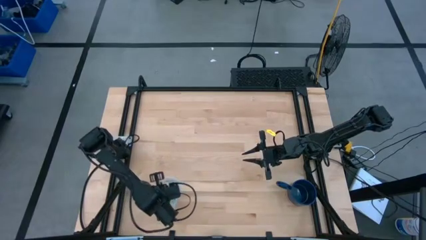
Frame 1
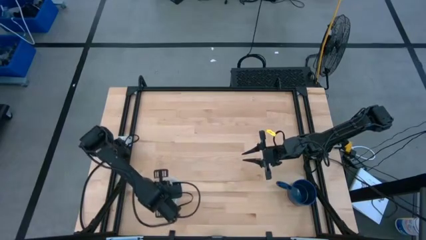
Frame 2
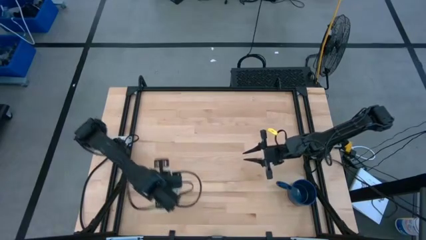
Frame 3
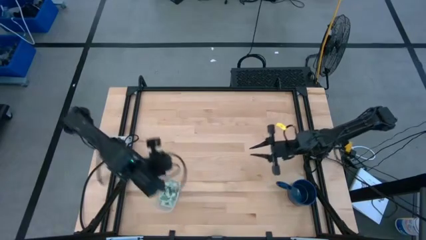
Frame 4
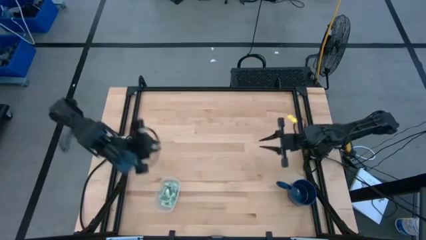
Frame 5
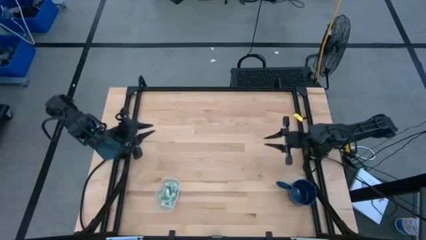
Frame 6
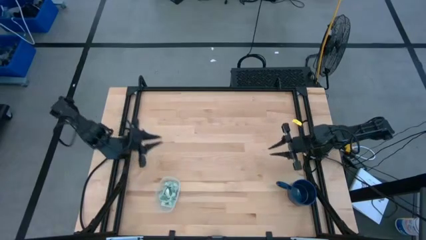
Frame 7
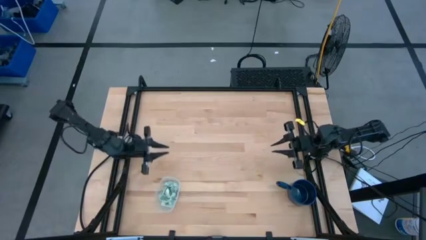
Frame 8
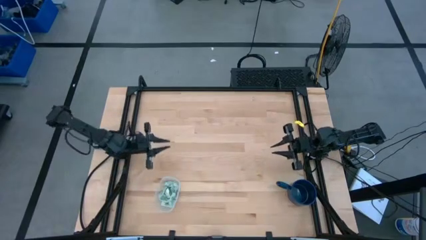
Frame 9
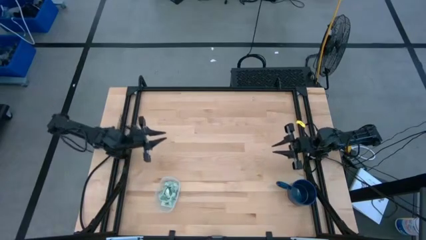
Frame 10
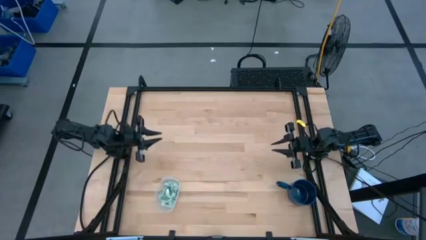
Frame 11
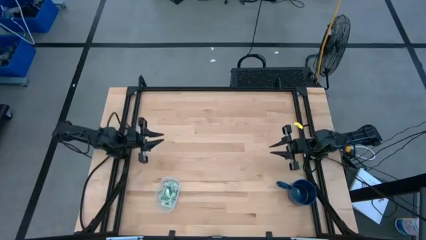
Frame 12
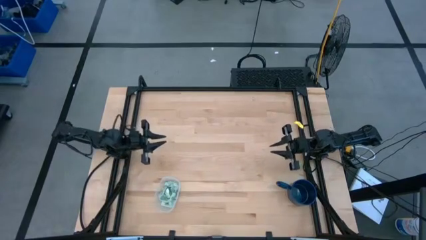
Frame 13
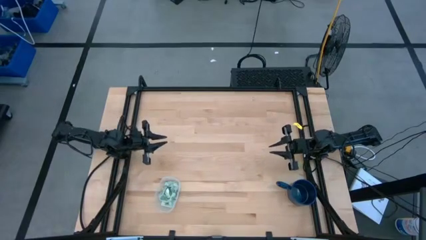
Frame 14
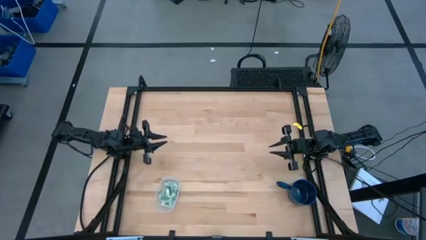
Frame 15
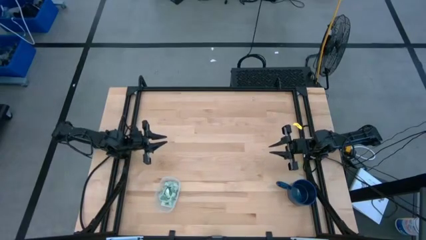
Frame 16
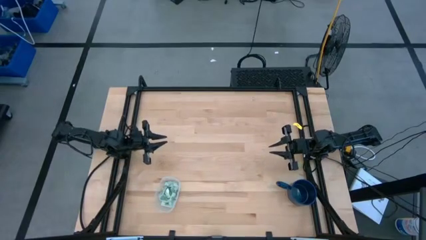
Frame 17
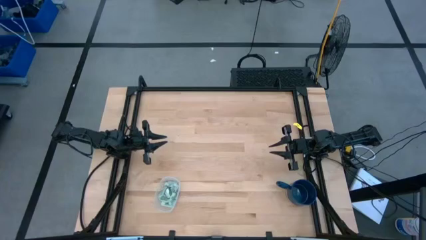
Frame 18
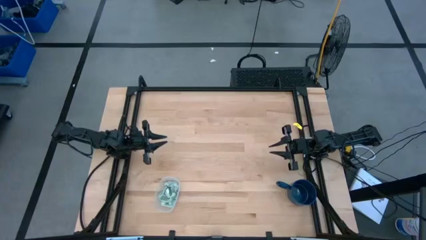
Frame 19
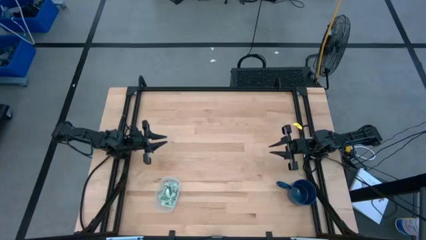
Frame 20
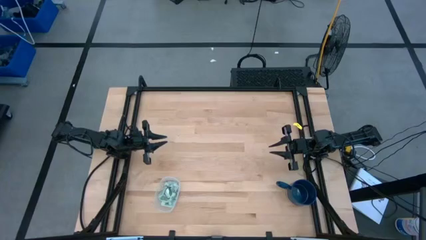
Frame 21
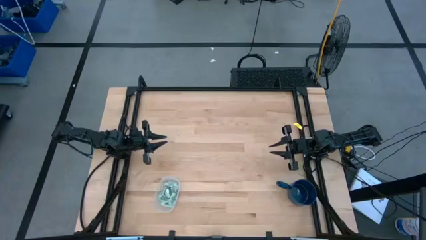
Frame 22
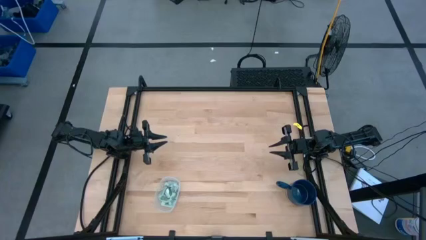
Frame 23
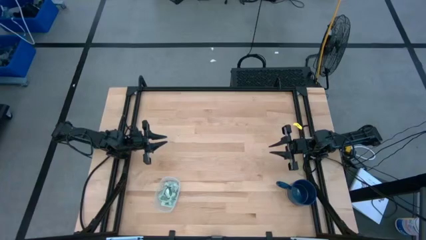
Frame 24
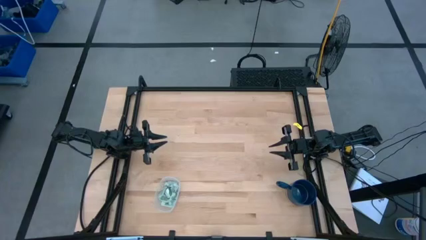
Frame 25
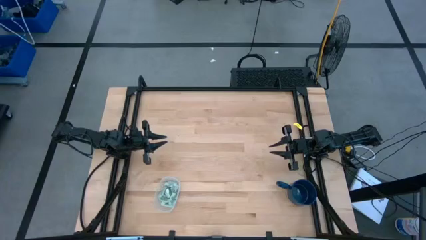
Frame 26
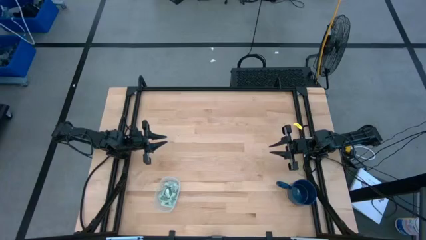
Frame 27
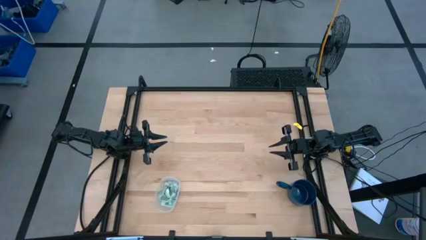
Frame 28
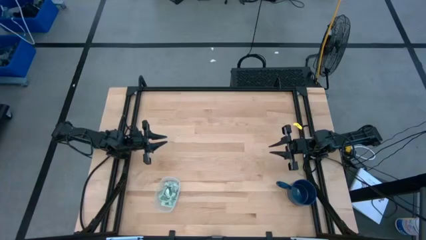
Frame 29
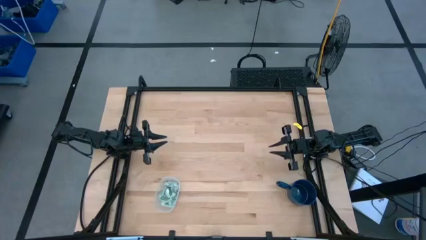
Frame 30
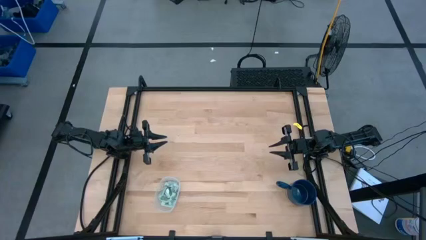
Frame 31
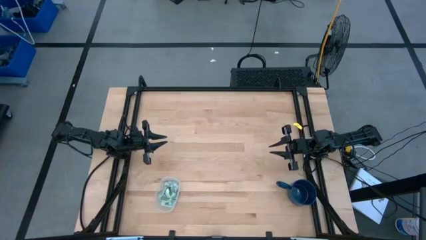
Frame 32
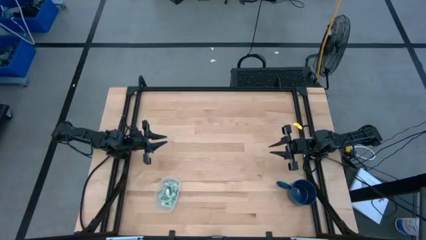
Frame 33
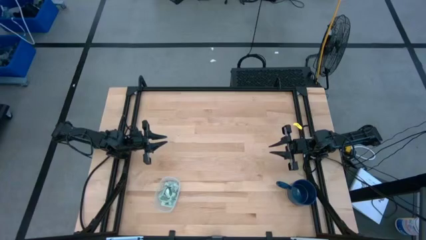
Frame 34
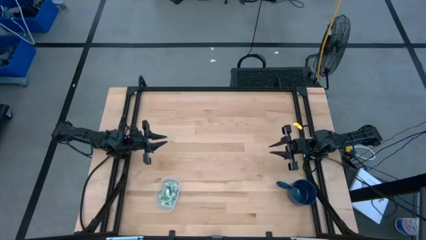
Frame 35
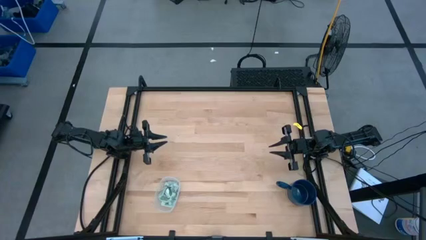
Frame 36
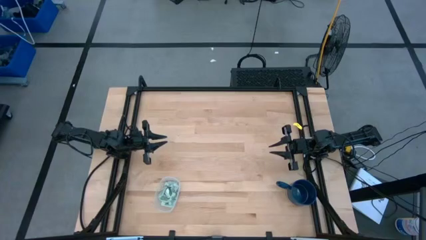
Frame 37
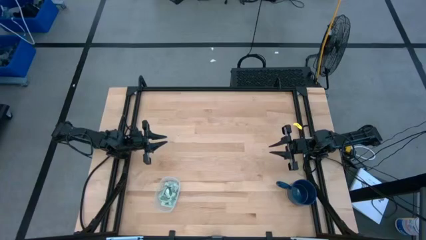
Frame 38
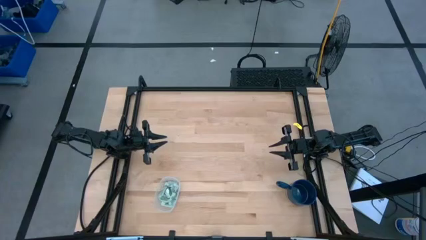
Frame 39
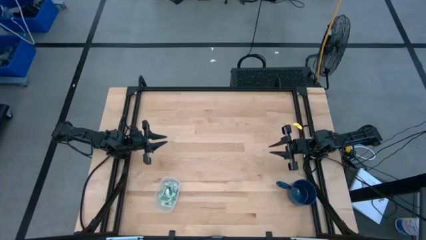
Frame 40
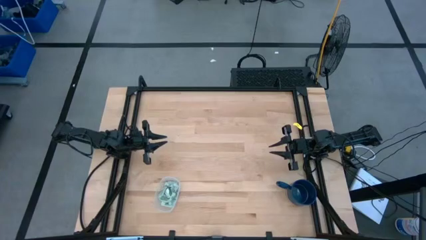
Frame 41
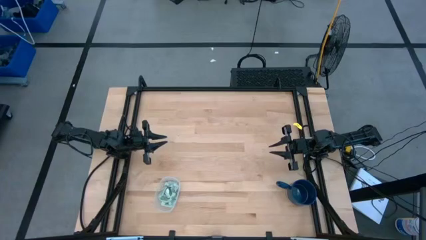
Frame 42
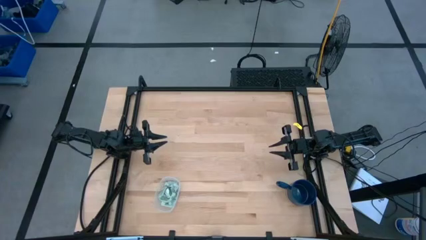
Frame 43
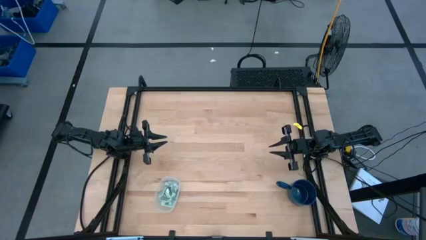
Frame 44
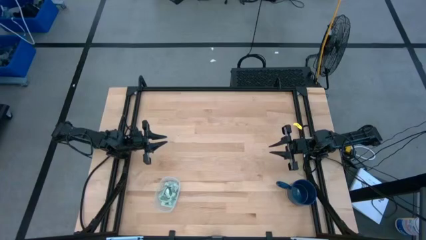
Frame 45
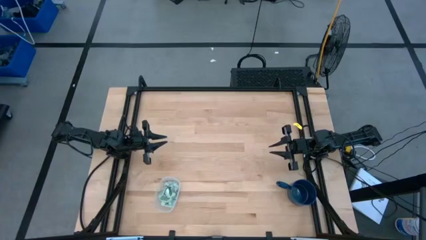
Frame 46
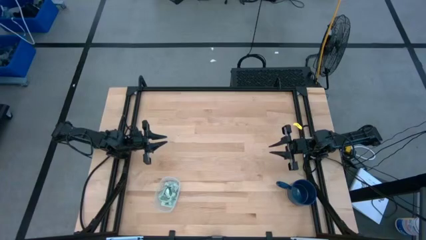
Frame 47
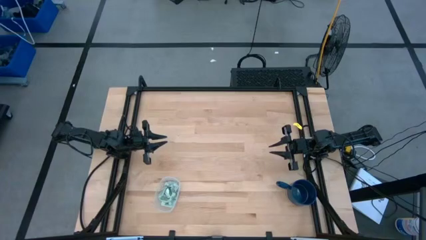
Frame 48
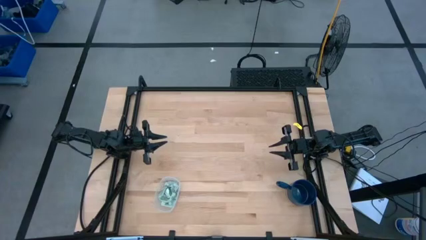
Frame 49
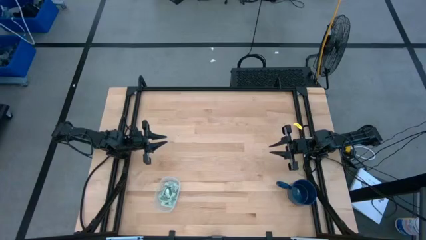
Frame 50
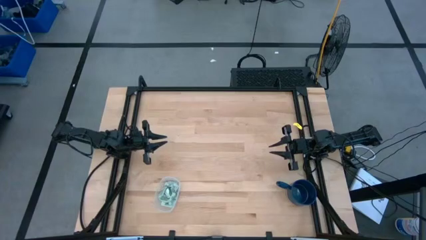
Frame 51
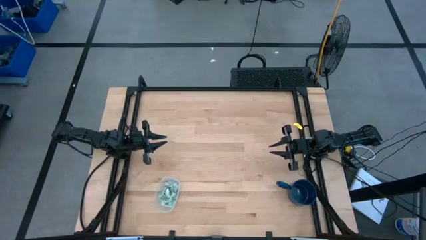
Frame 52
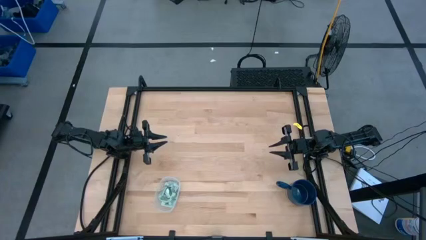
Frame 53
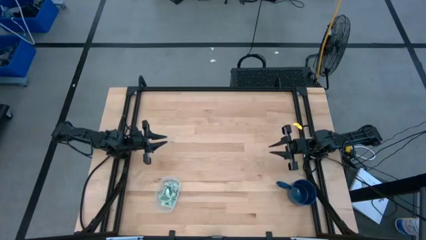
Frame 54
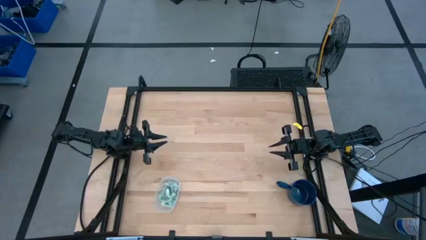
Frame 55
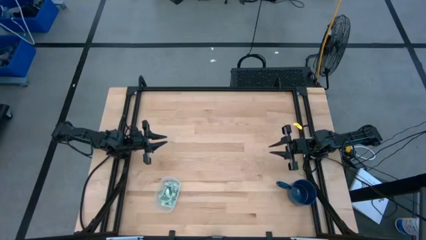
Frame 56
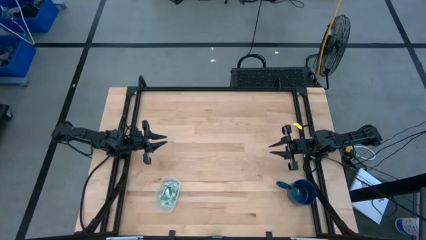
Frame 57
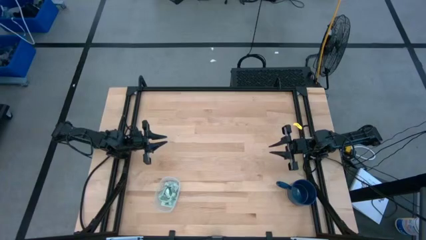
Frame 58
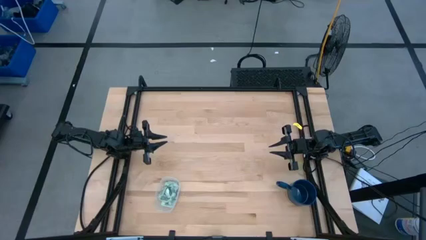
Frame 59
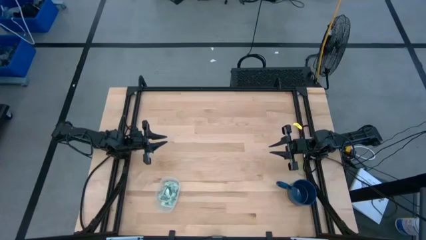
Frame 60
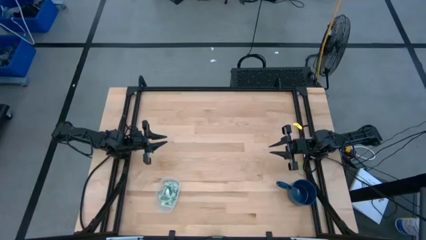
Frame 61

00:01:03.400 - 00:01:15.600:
Task: Pick and place Stevia / Truvia into bins
Return to Home Position

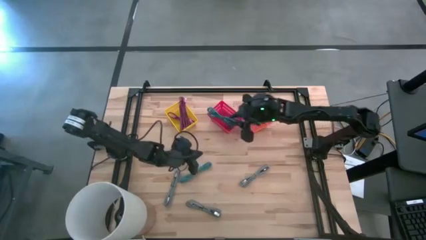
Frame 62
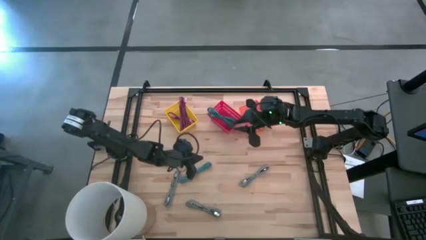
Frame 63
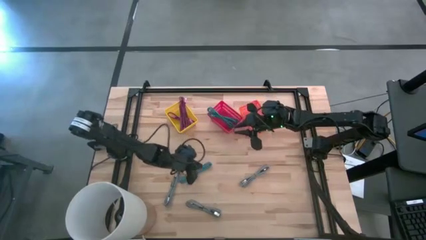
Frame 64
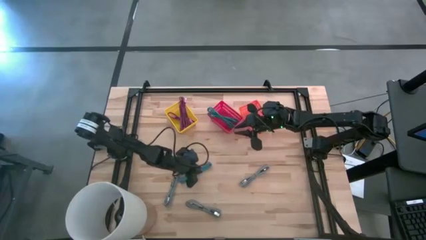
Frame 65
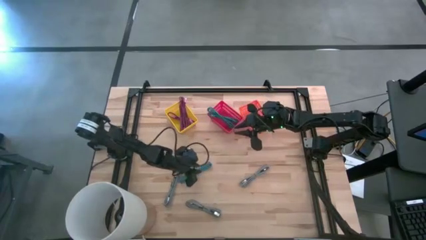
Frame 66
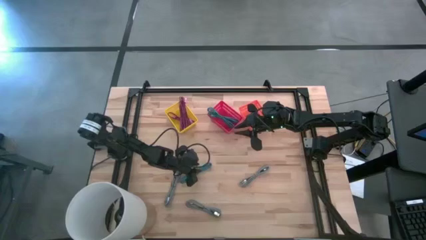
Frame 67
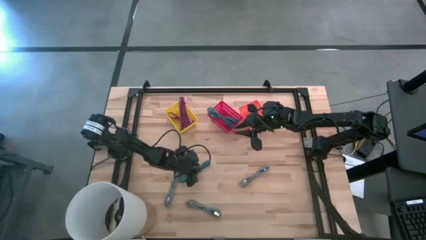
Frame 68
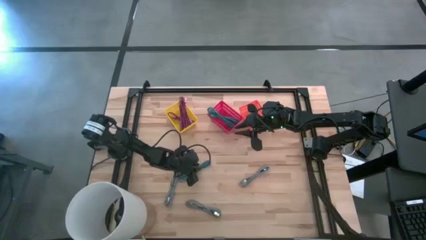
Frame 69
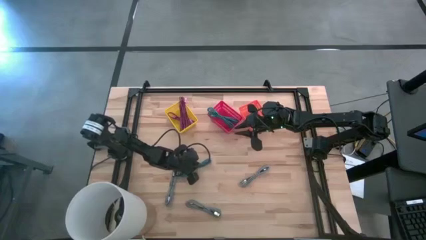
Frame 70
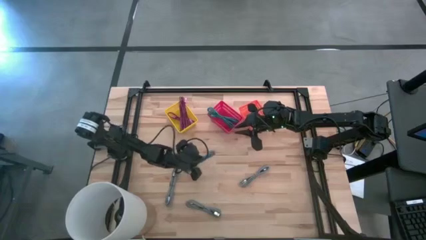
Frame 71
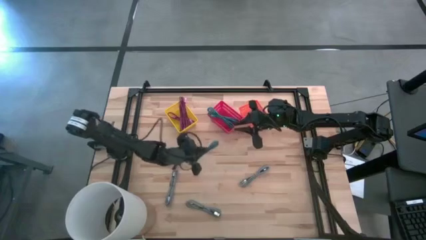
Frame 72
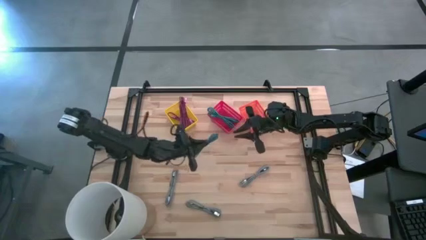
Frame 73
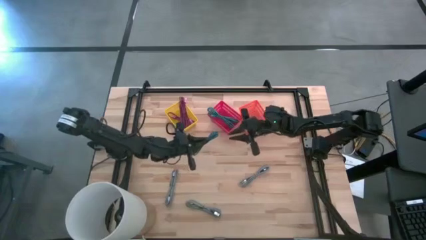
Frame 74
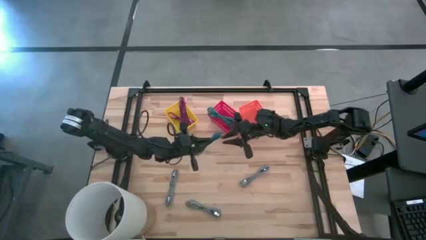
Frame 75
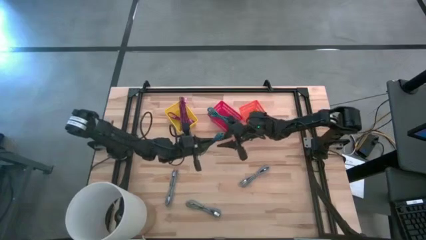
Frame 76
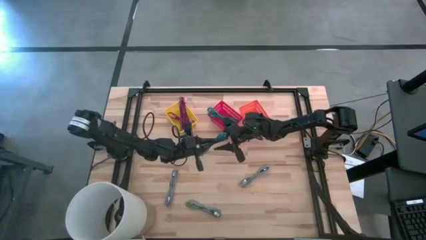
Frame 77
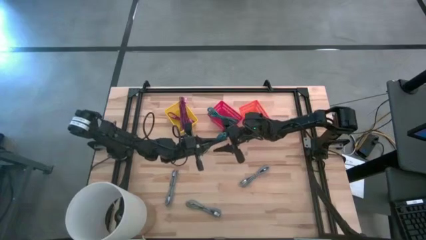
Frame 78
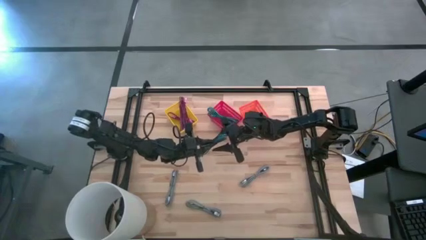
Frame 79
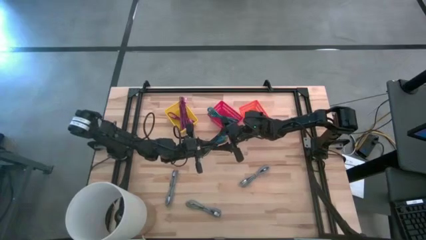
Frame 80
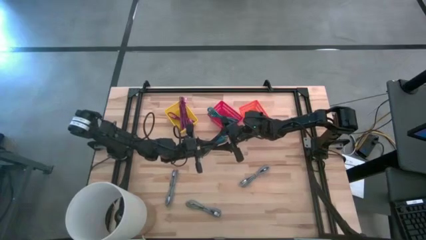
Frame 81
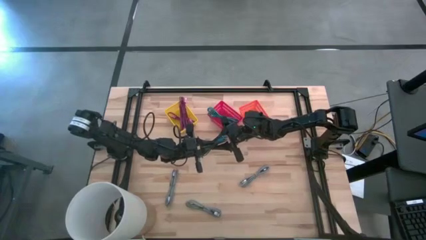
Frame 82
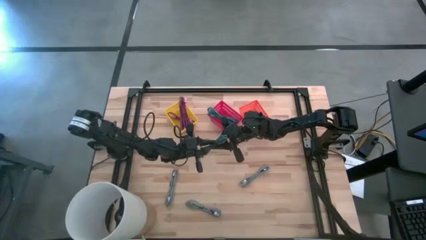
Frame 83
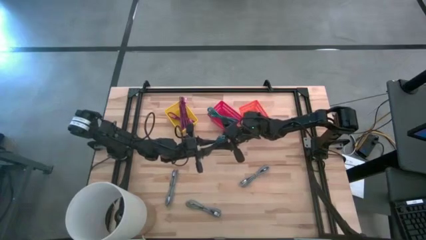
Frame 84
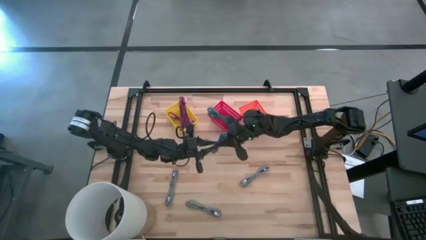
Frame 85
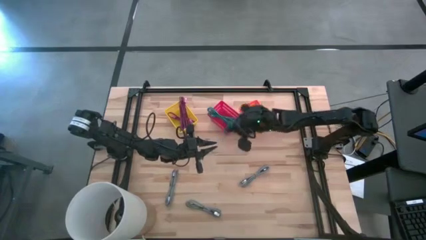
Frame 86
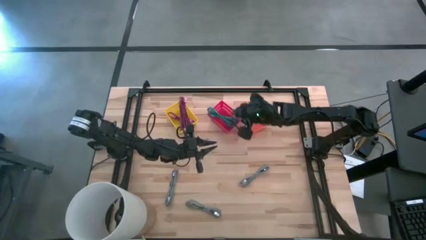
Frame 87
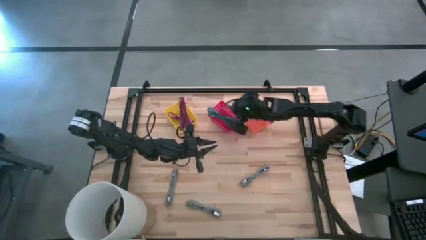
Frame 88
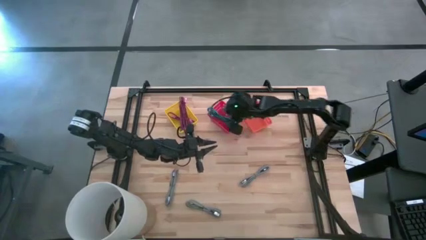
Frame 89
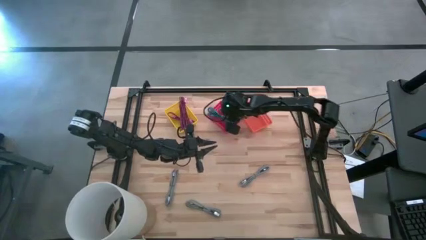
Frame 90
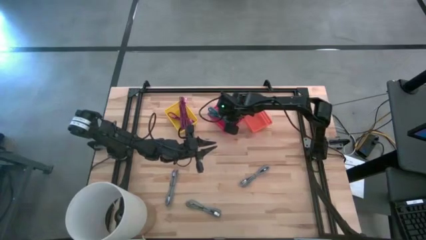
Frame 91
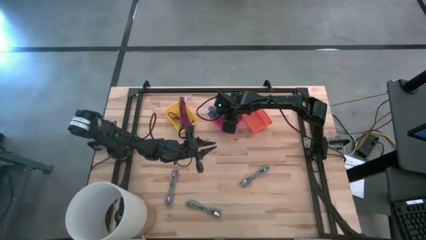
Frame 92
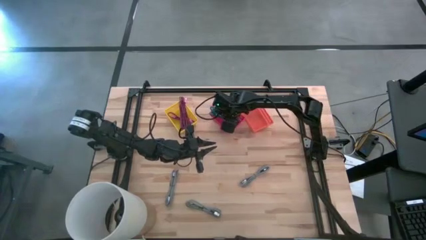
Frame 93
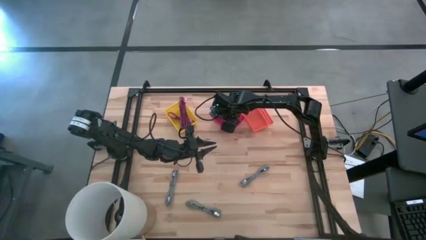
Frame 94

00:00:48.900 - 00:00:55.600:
Task: Pick & Place USB Port
Put the black blue USB cable into the red bin
